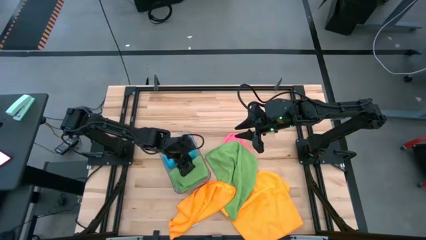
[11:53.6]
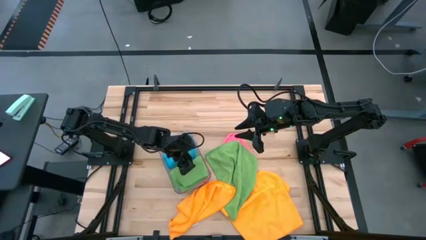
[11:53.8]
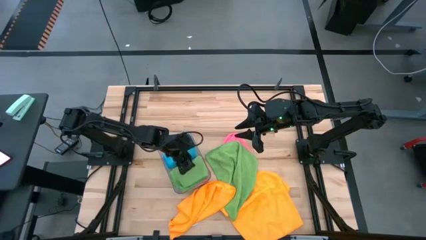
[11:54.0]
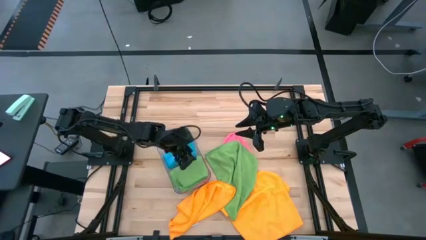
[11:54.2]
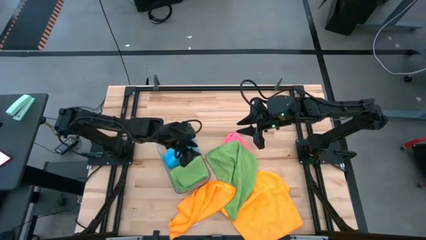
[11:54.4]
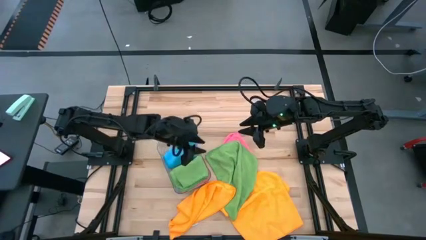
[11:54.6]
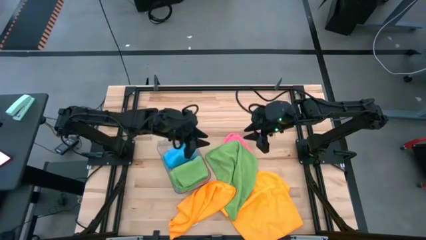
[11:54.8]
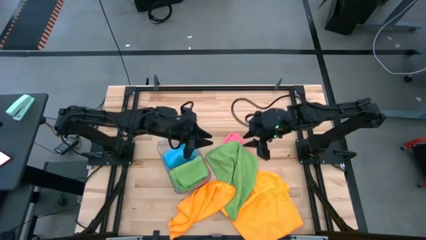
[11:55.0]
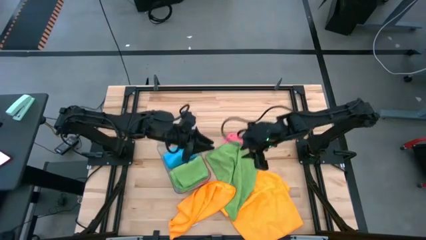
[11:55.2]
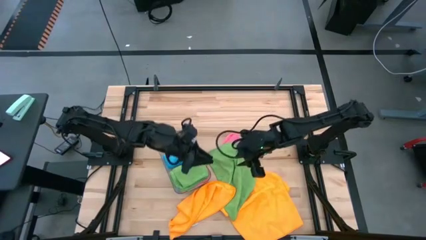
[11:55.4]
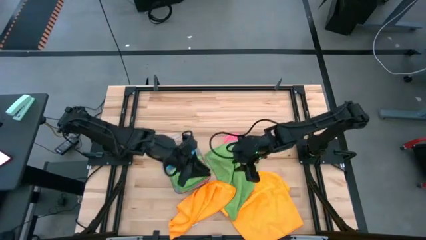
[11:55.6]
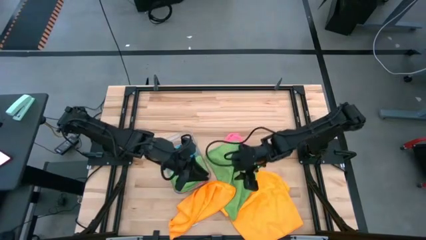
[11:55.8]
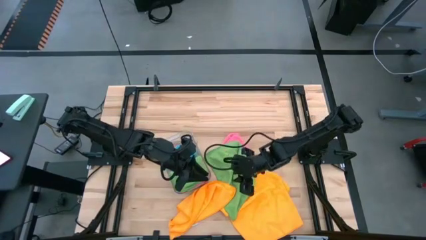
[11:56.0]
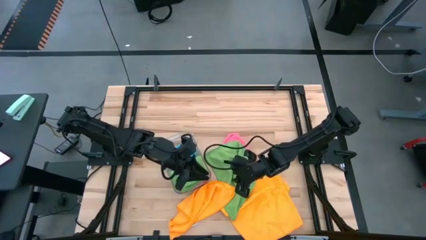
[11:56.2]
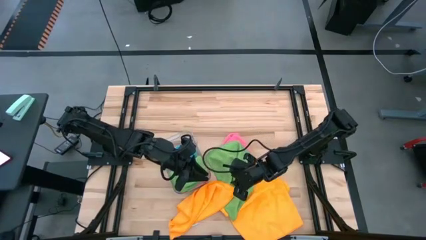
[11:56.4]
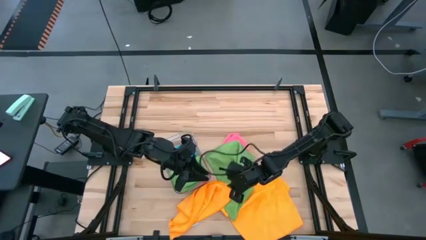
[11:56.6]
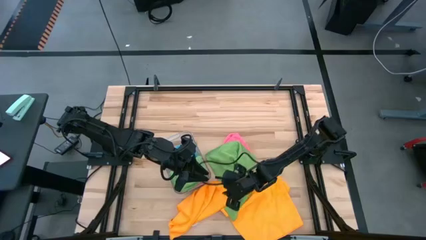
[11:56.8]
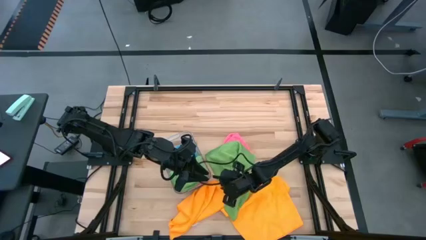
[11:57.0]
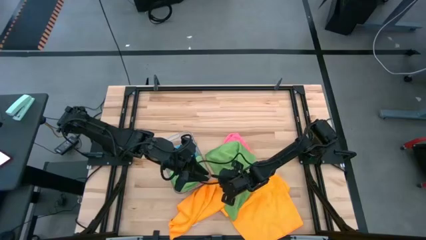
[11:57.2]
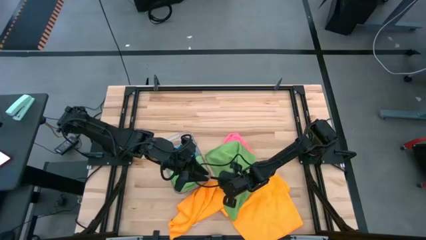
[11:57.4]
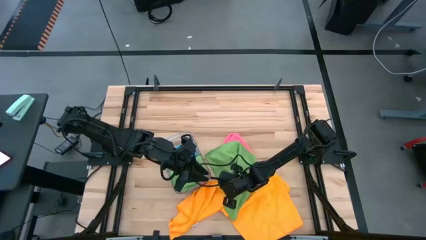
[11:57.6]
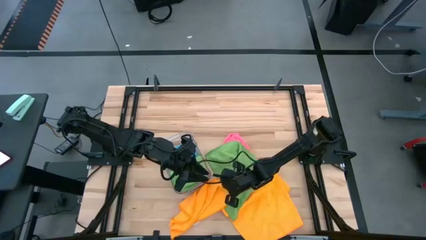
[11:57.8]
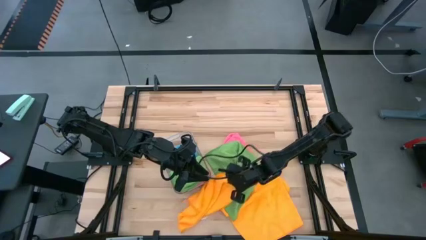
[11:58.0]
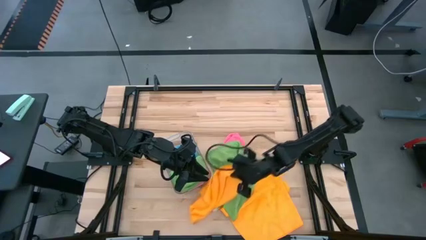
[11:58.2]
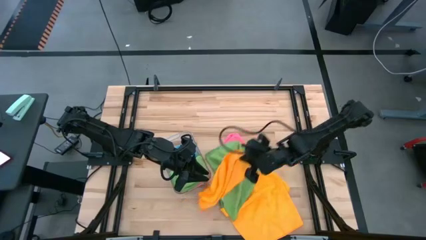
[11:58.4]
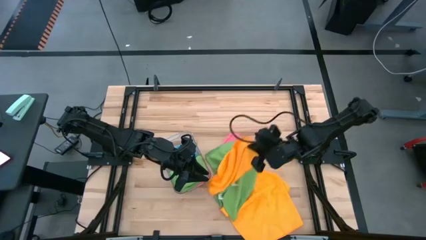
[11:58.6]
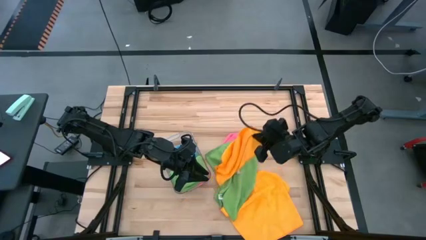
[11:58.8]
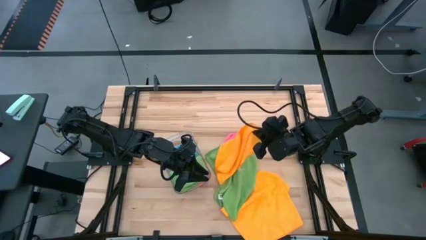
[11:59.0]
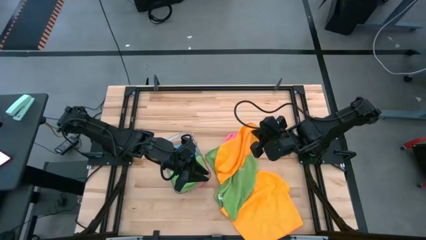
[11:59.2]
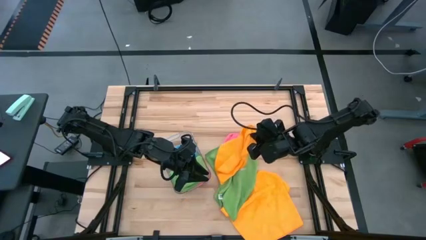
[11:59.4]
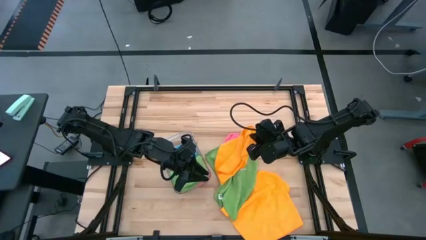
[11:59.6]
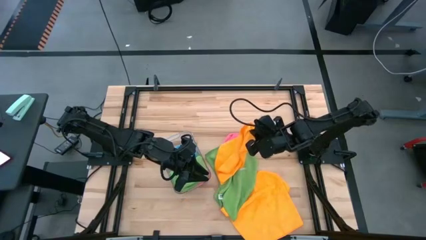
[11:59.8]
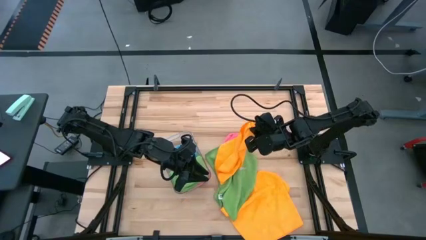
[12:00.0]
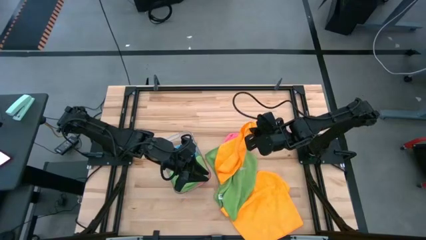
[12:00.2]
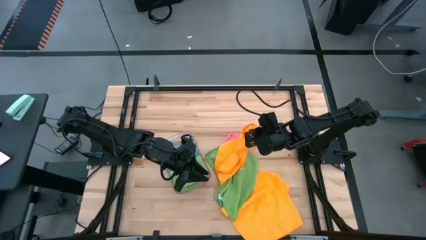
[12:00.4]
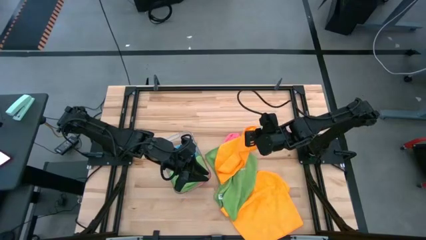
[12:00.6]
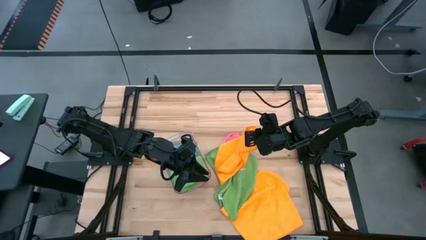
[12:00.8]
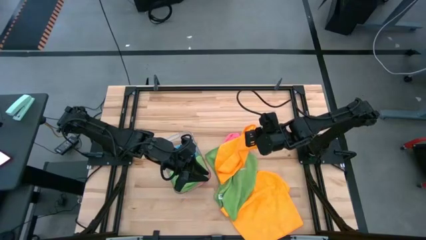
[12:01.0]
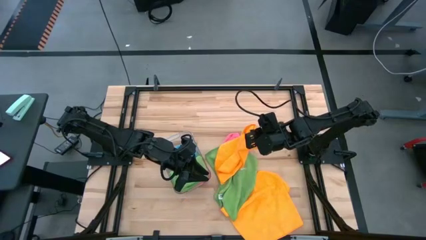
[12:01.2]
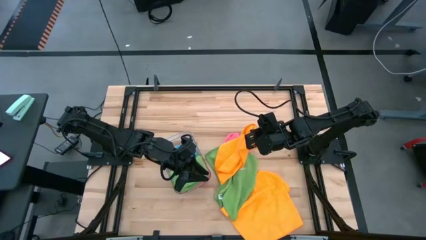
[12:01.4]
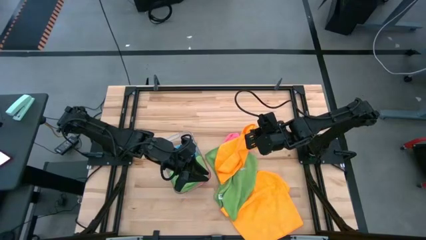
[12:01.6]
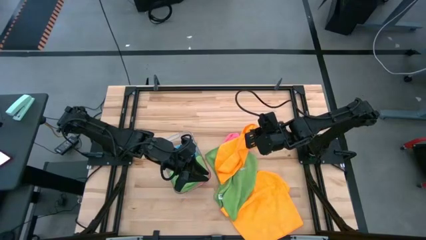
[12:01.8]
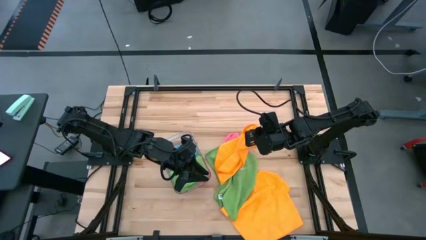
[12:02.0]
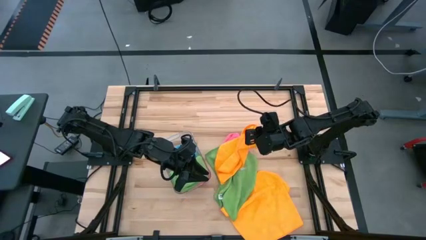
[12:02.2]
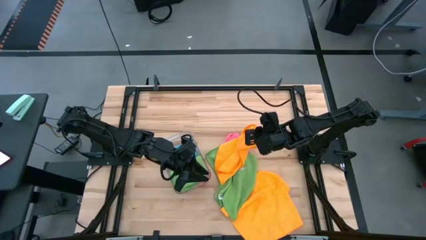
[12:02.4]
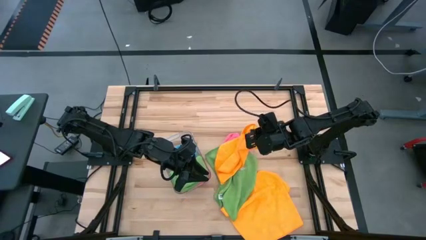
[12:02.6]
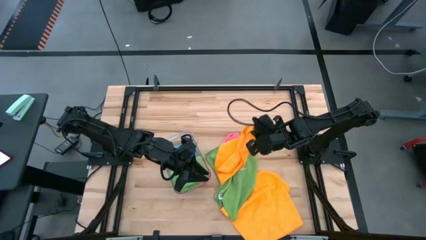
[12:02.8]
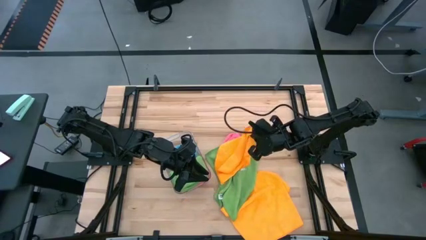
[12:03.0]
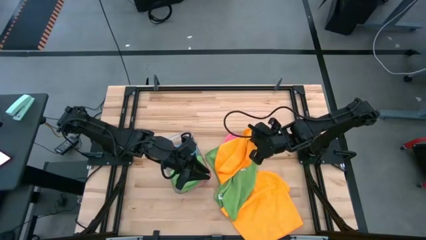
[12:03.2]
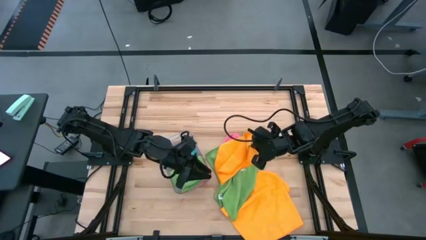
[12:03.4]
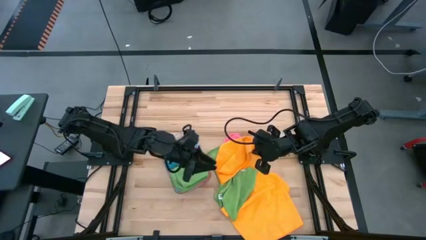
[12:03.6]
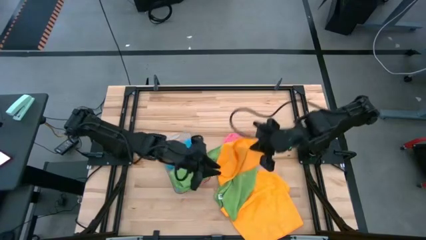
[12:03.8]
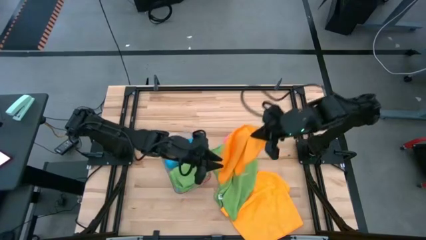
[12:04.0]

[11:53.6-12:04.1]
Task: Fold microfiber towels
Fold the left yellow towel
